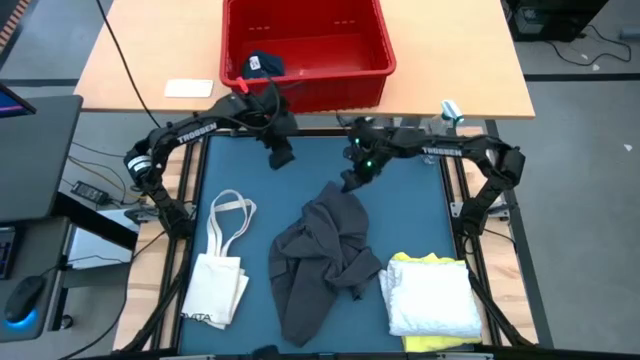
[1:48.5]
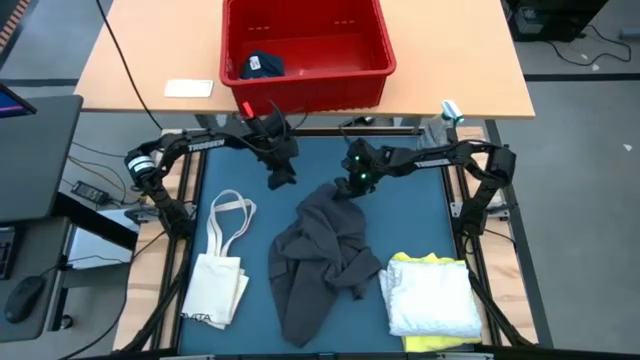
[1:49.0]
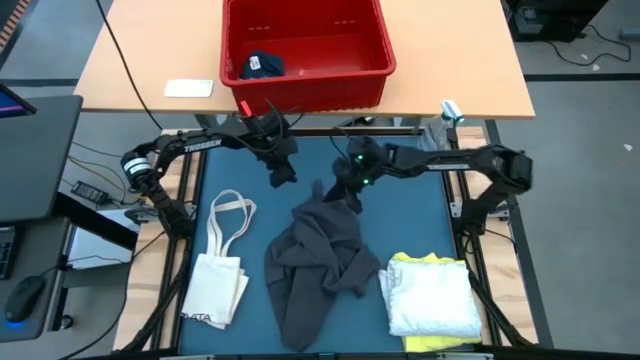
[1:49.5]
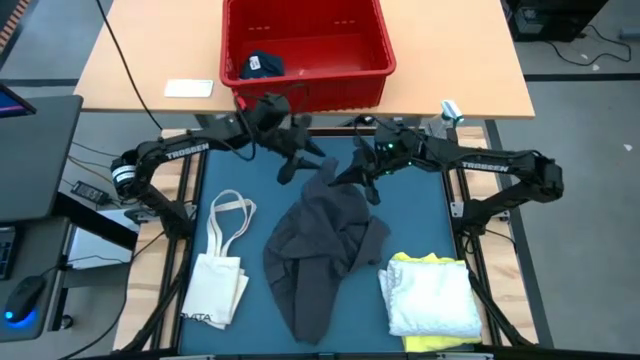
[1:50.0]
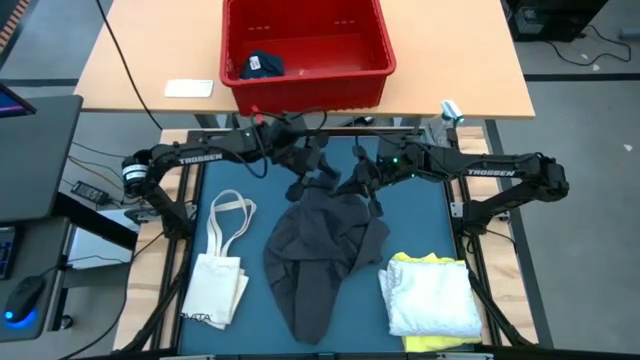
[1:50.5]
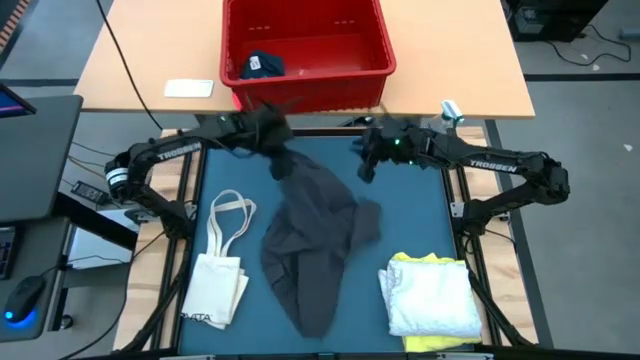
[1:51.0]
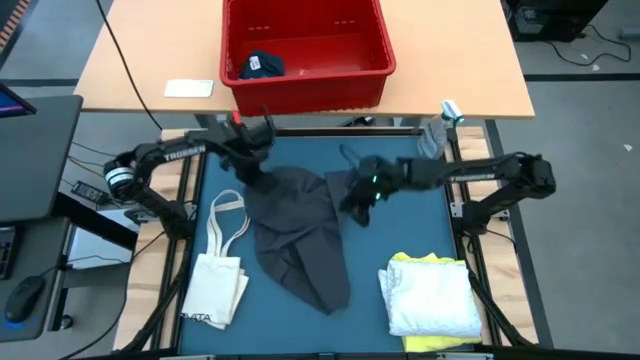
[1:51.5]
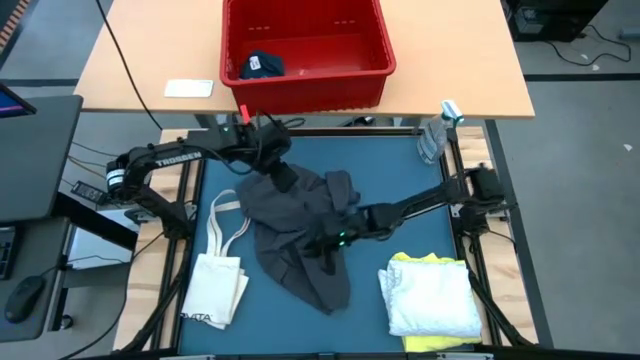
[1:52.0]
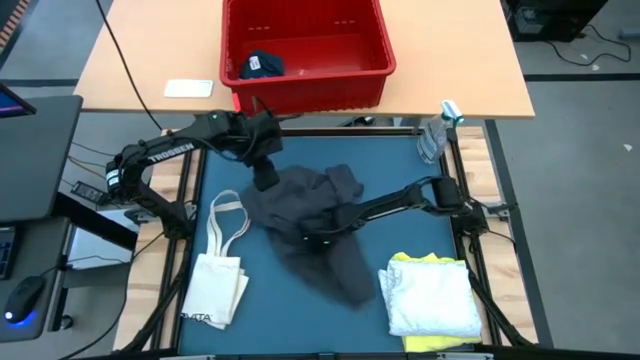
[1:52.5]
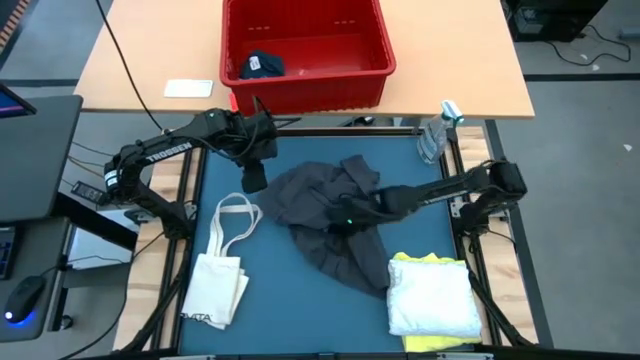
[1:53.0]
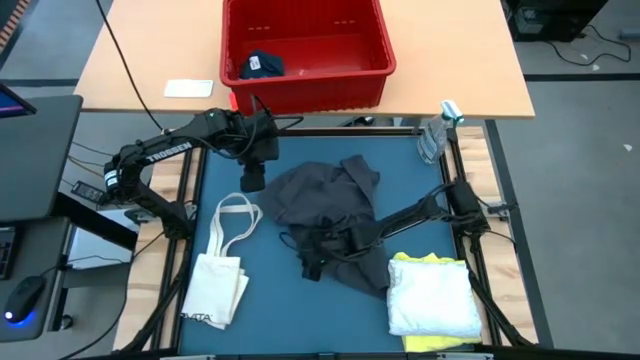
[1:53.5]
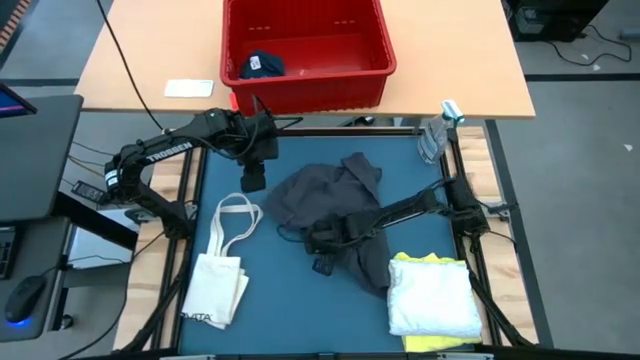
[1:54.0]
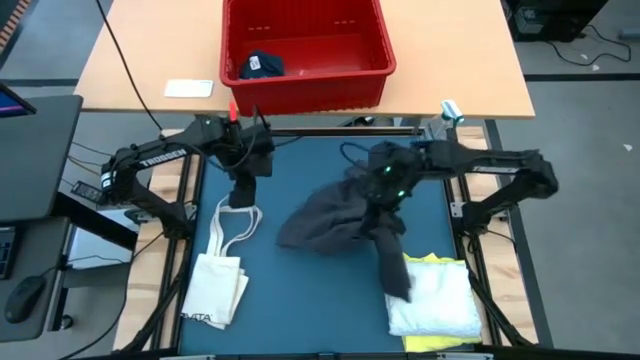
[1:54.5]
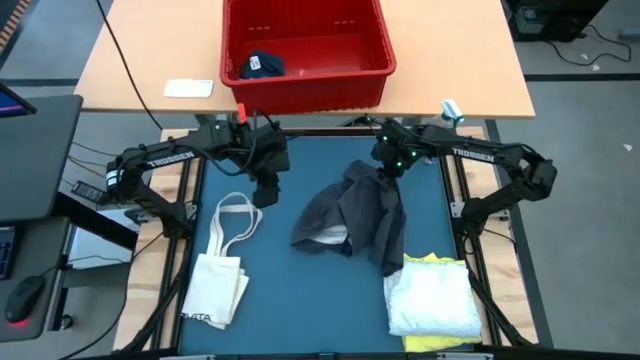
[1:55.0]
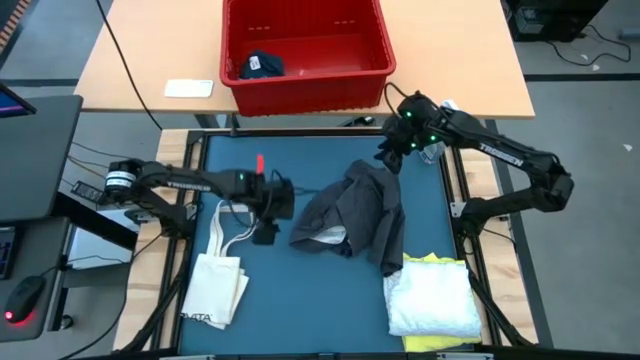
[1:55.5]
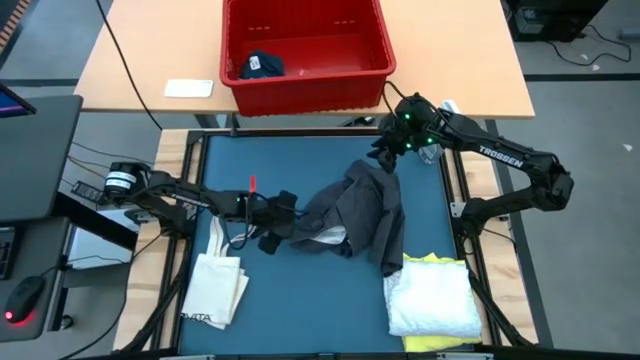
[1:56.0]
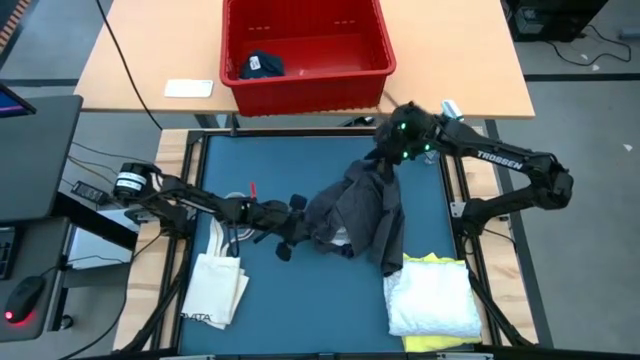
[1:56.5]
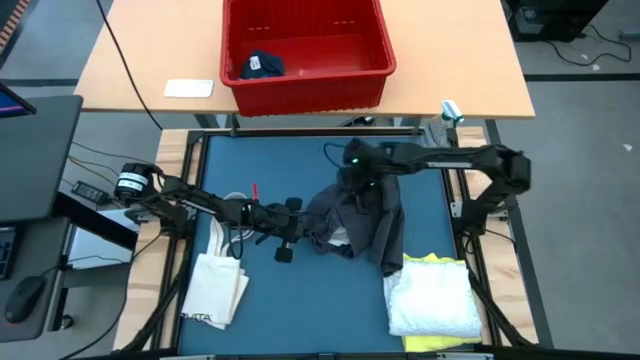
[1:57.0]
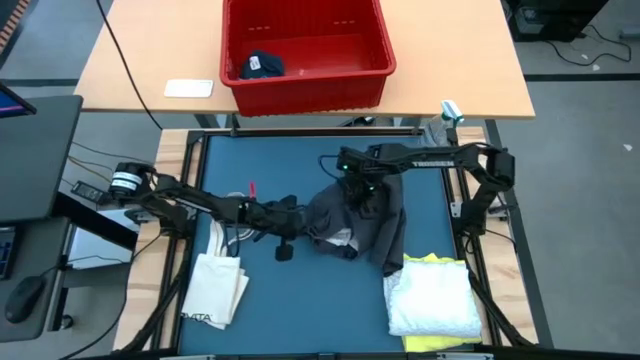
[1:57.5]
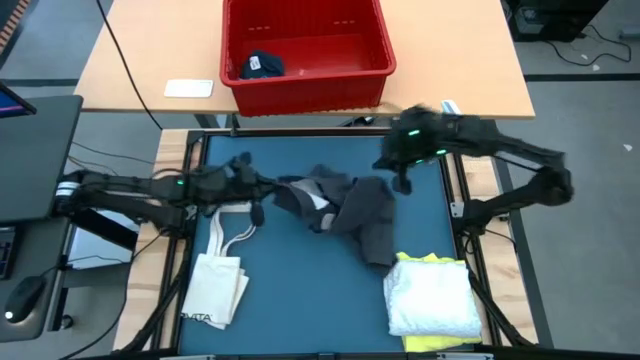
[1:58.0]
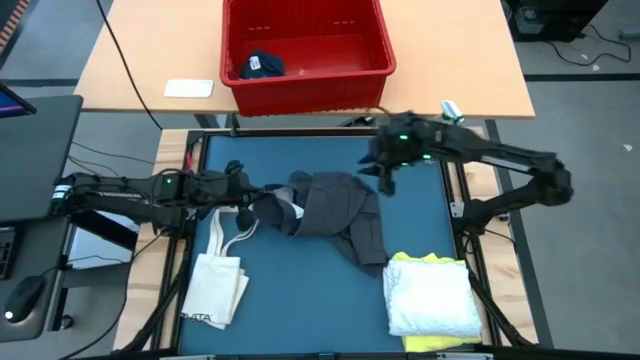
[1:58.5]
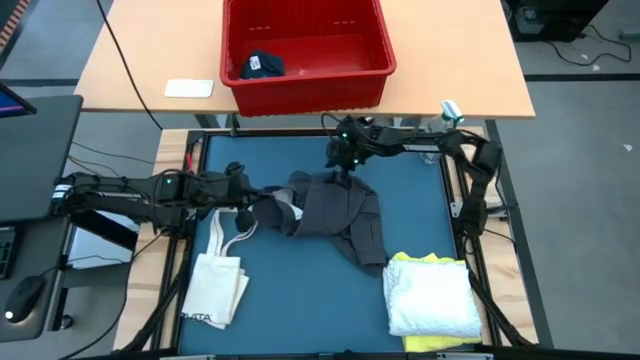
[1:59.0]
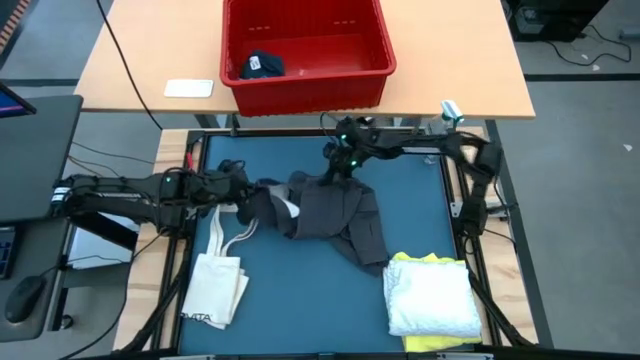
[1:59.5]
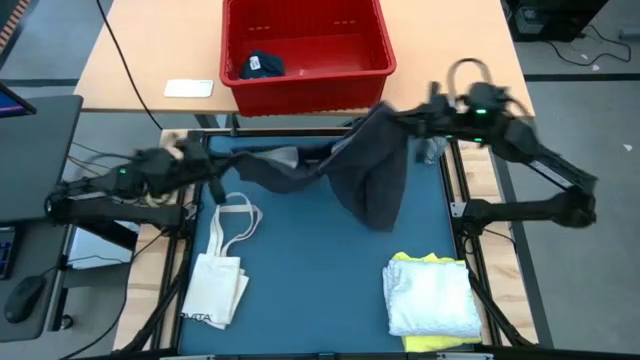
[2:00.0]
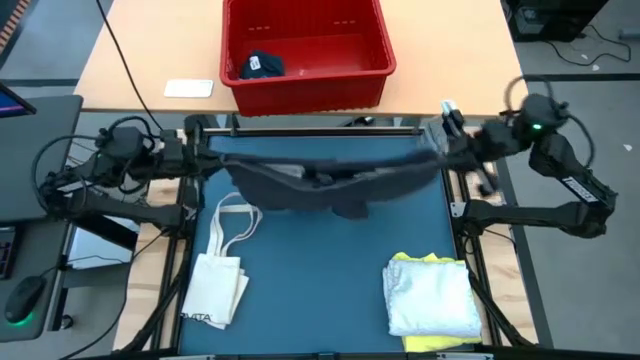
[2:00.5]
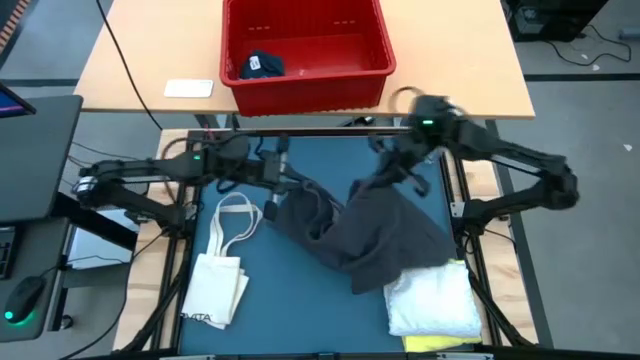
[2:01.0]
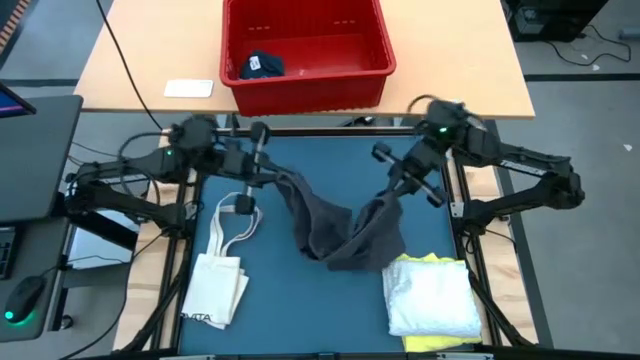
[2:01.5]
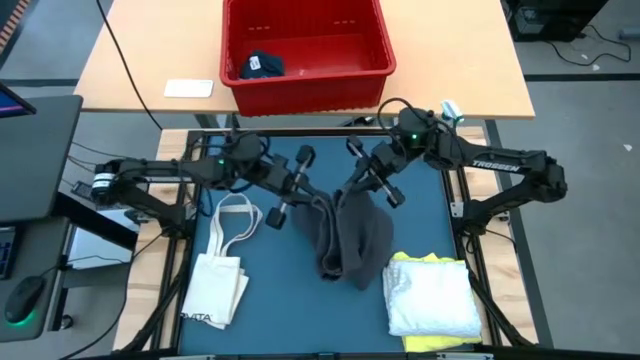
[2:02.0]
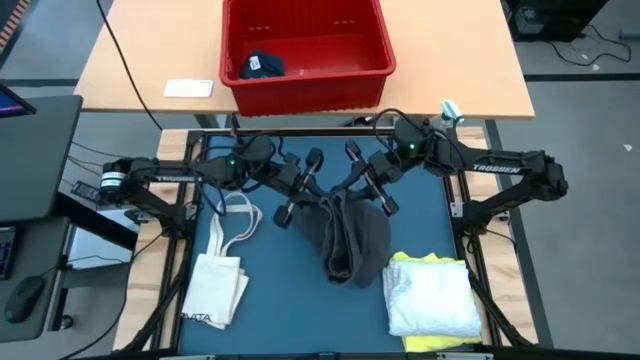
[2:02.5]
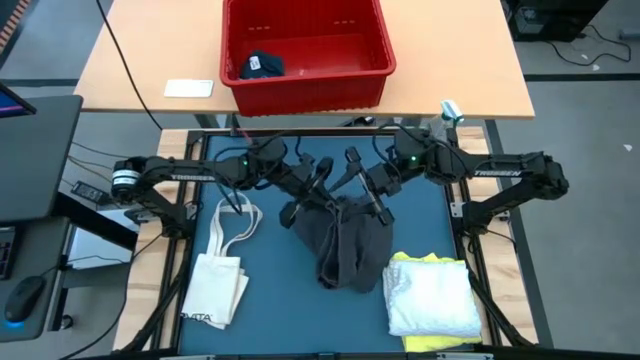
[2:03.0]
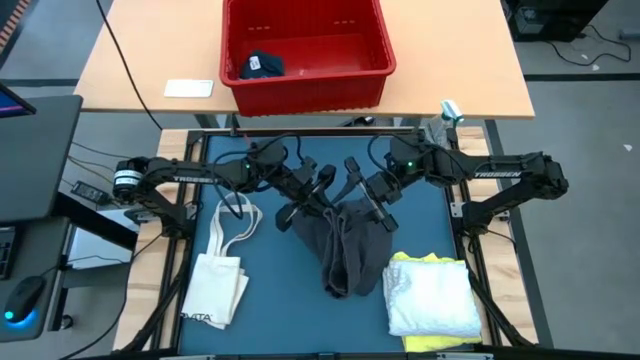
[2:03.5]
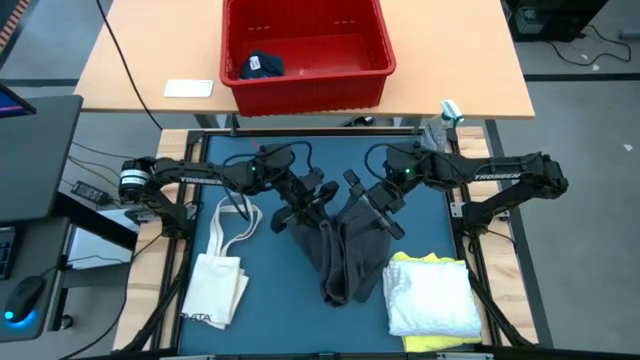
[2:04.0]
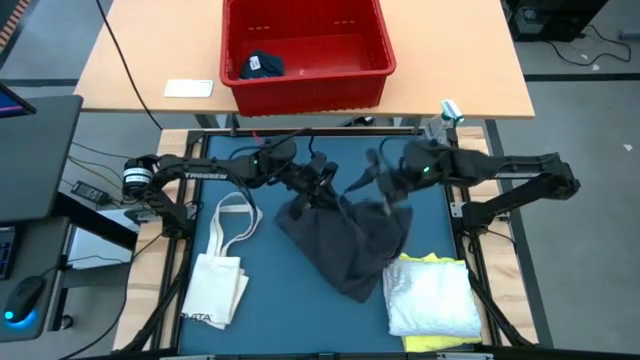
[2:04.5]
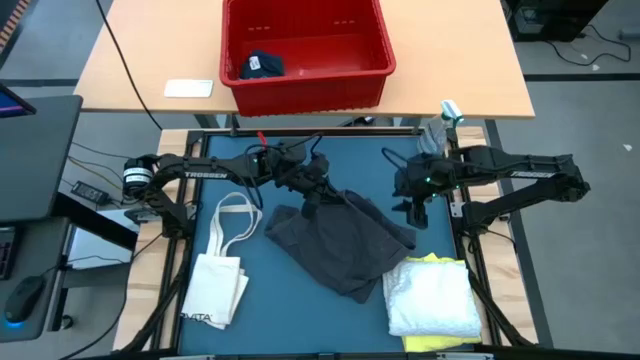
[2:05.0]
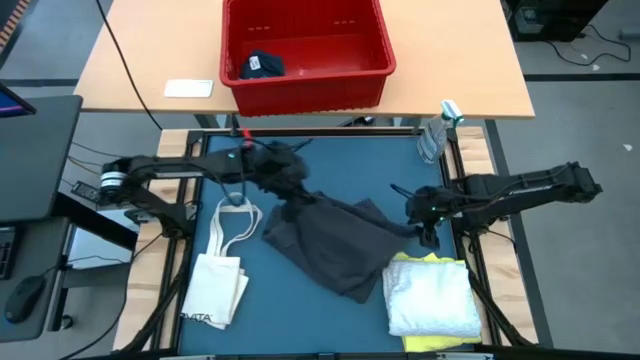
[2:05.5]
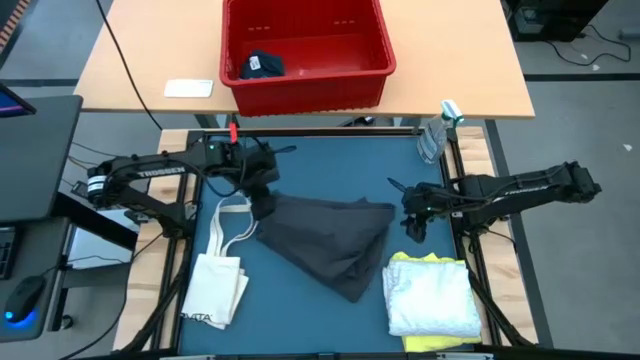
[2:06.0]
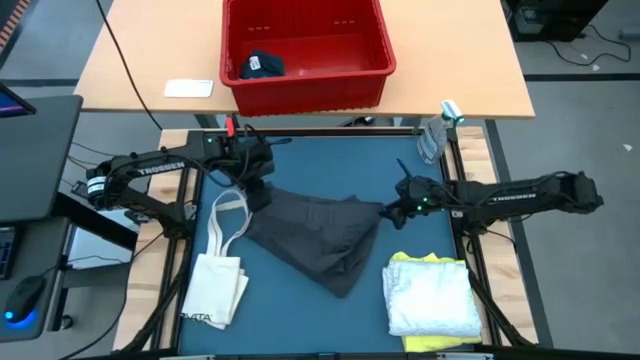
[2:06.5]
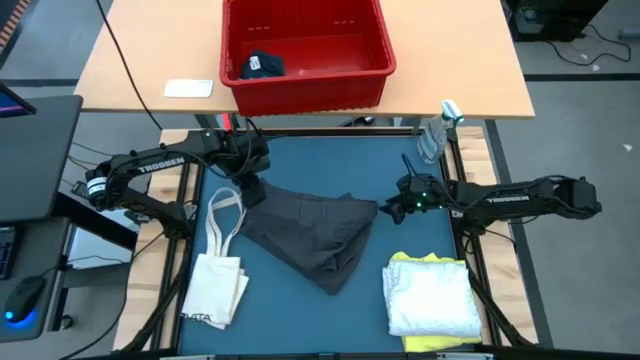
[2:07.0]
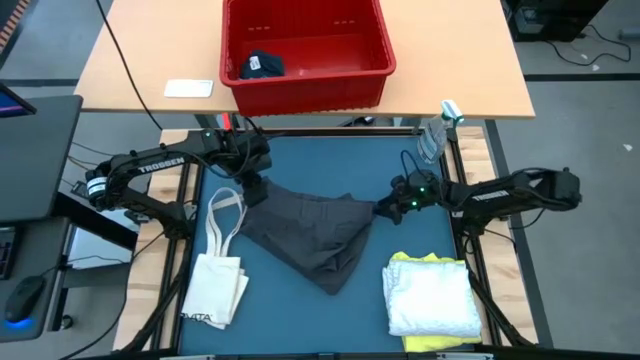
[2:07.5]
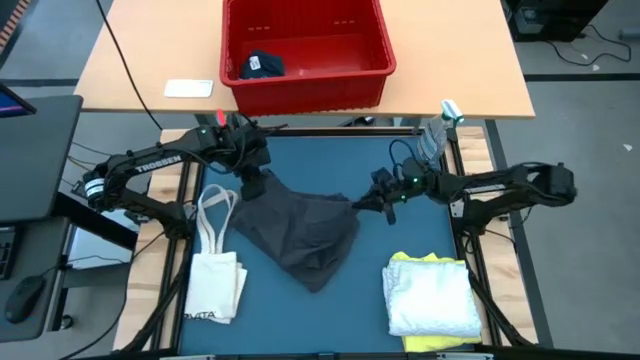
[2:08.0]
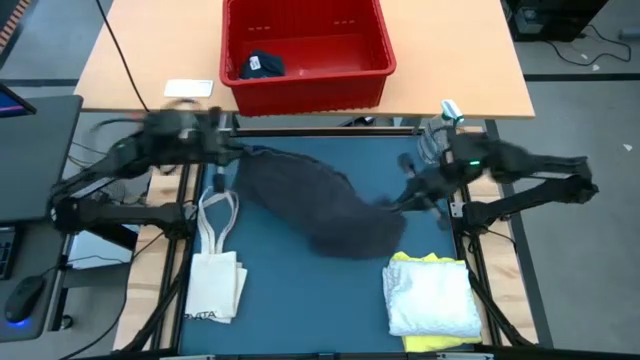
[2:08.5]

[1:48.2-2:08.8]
Task: Fold laundry
Fold the gray boxer

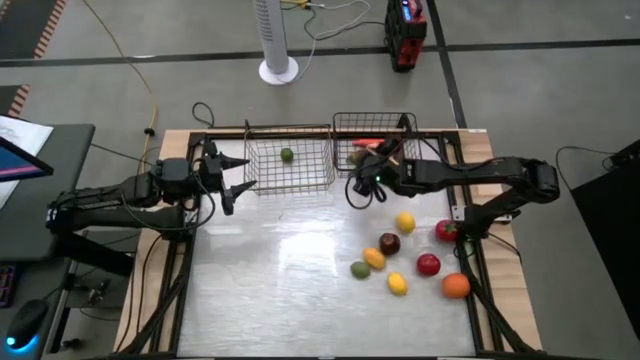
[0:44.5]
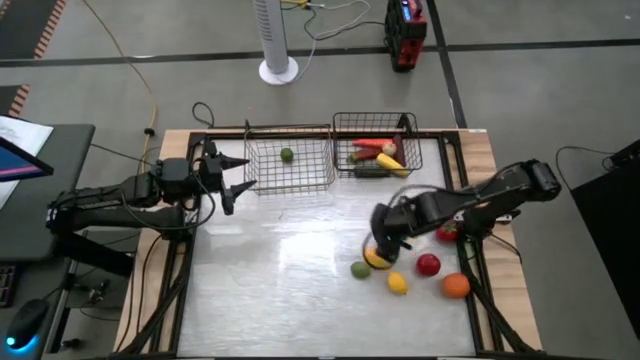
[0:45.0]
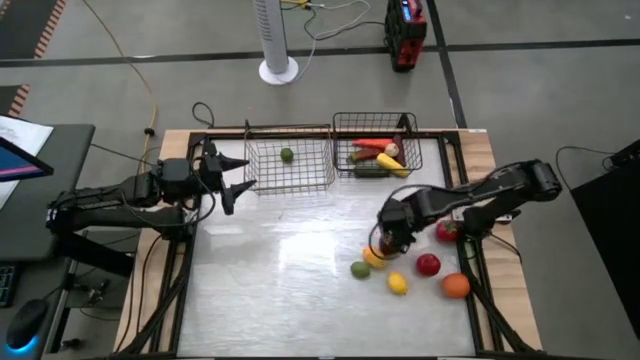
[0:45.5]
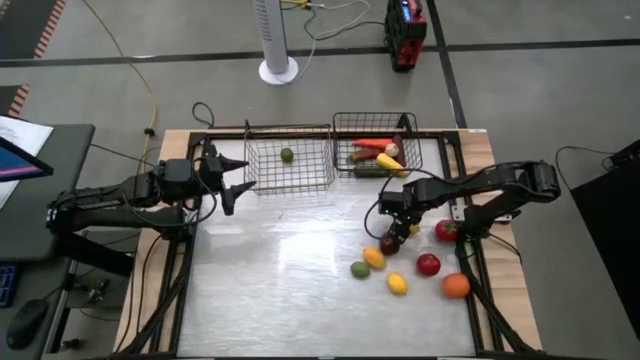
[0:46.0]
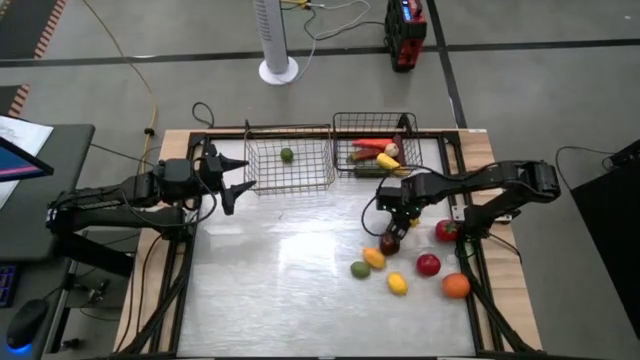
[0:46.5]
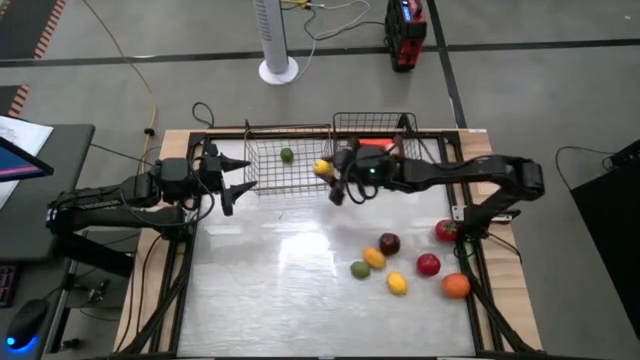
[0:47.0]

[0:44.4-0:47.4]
Task: Sort produce into baskets
Put the lemon into the left wire basket
